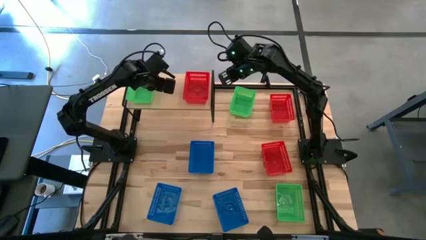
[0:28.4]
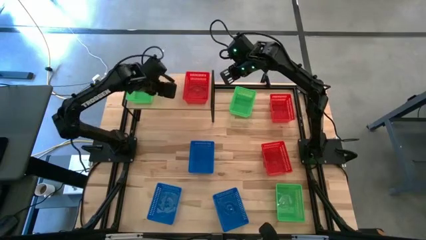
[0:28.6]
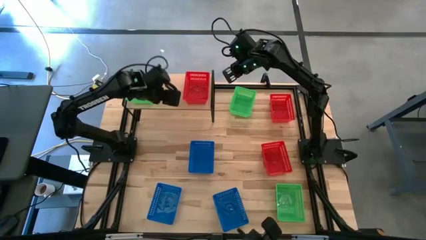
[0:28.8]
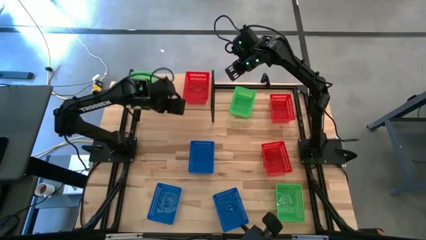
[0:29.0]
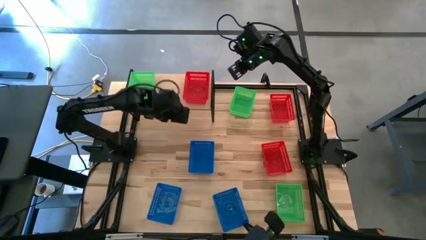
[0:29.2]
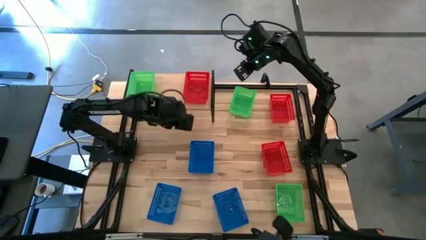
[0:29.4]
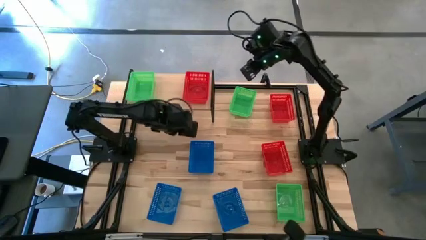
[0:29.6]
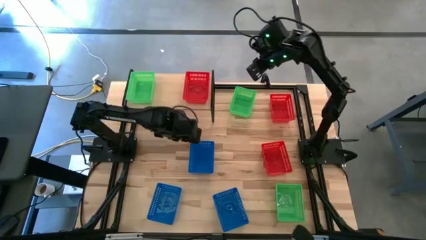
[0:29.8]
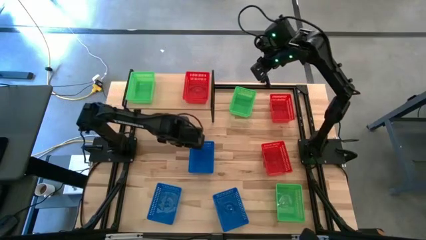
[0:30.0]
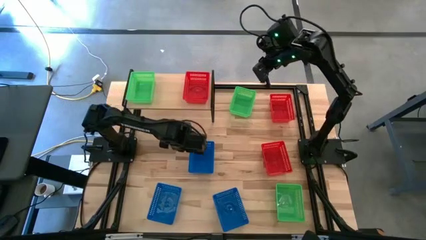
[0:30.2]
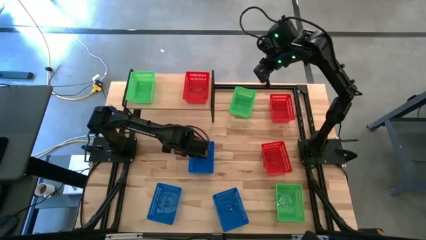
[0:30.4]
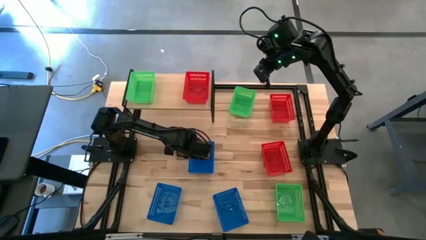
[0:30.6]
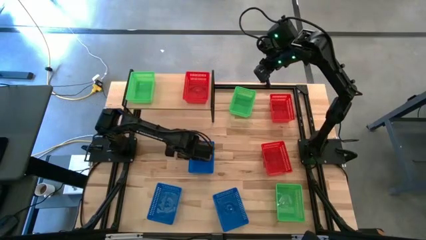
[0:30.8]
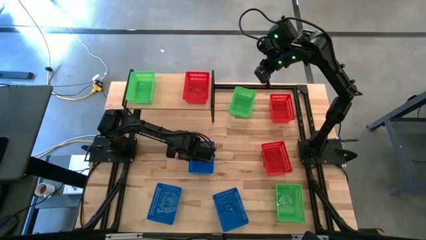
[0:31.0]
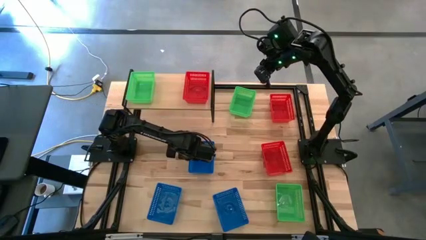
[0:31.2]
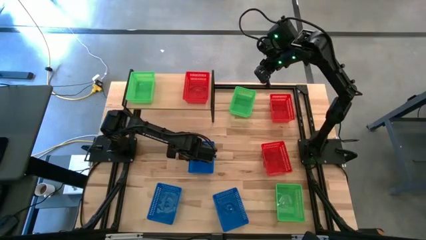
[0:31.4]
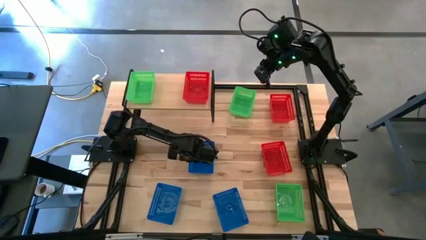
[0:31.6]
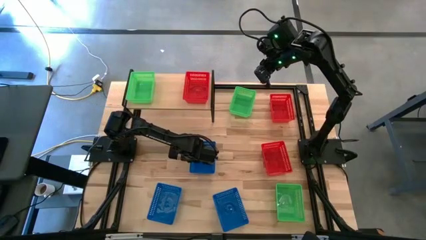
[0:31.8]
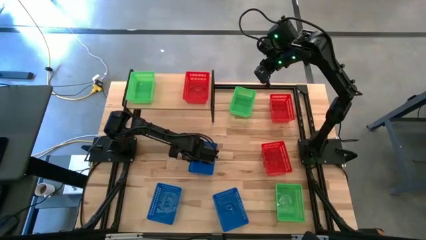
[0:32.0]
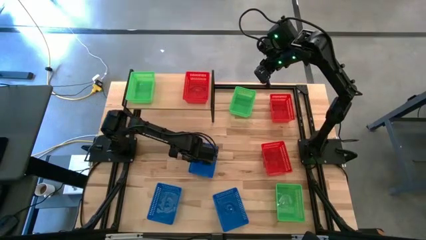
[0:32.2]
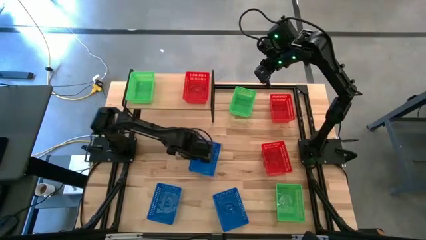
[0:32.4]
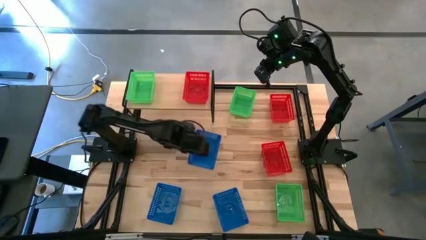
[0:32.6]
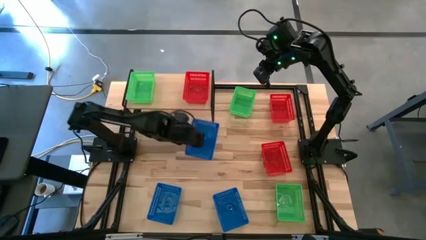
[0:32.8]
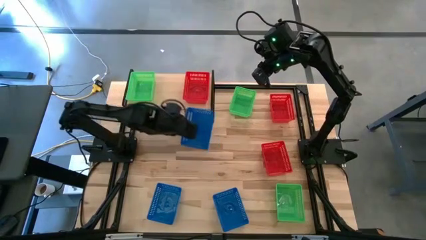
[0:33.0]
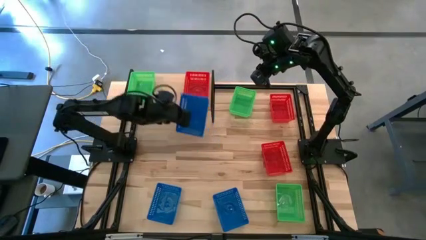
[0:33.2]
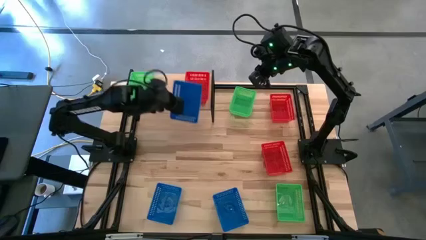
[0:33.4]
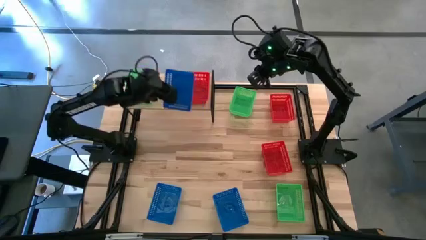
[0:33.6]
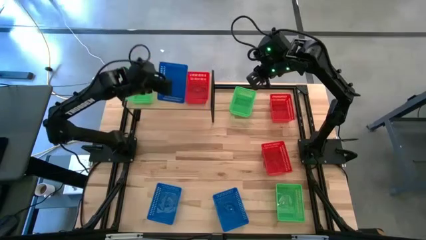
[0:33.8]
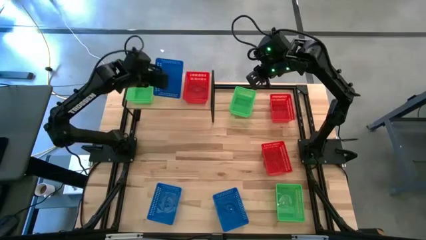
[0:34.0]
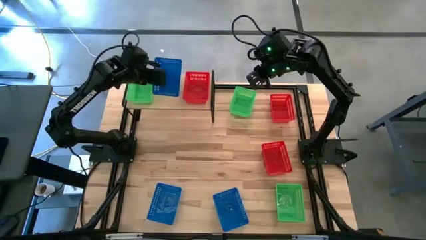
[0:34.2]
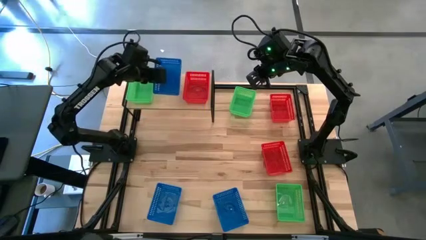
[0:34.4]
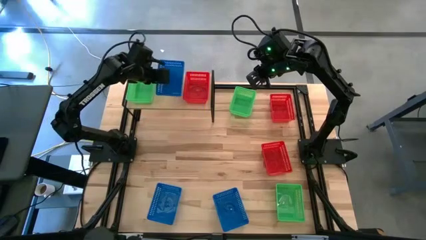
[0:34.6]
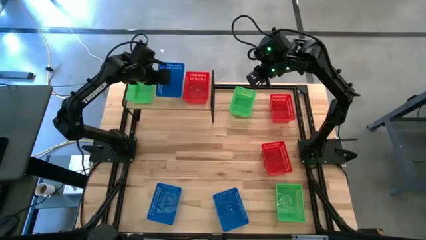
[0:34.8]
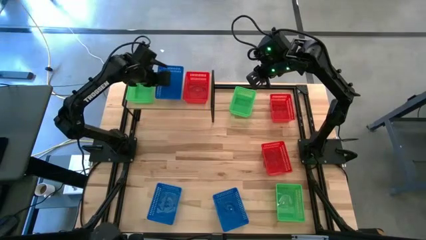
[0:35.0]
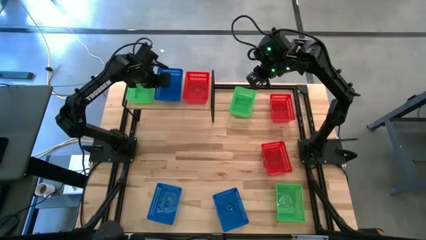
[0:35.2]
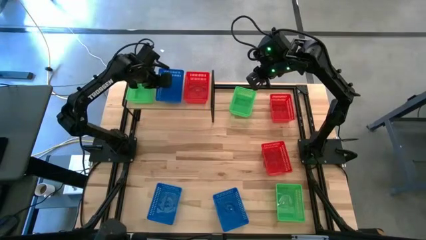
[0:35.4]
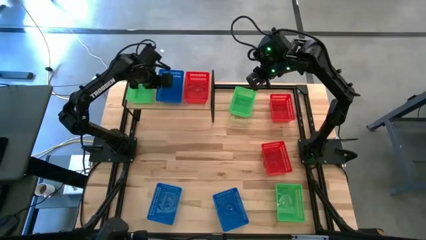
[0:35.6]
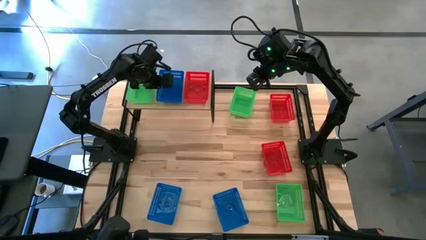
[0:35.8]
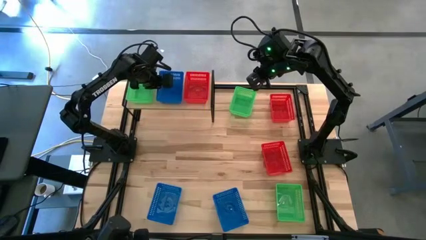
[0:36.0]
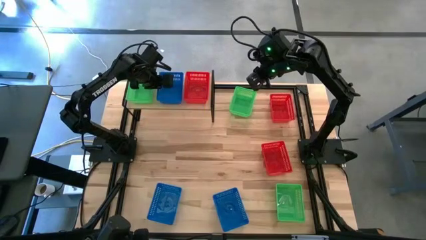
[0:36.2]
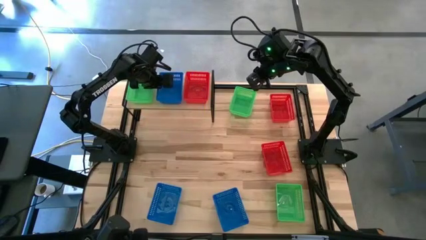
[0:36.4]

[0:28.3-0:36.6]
Task: Stack baskets on shelf by color
Put the top blue bin on the shelf

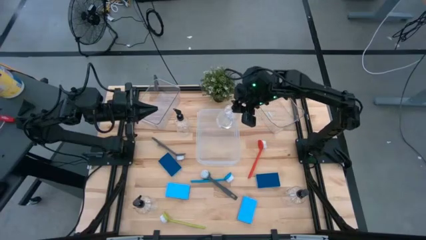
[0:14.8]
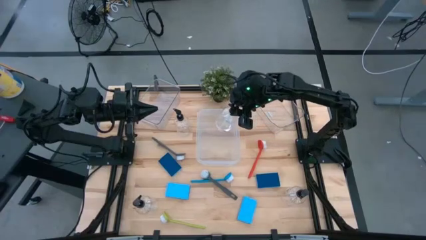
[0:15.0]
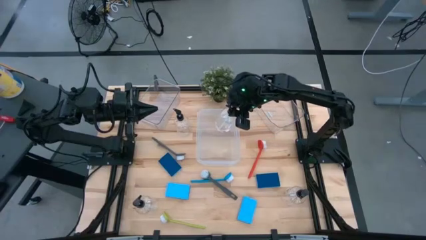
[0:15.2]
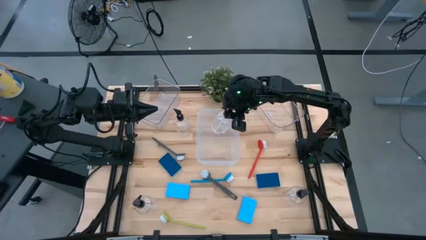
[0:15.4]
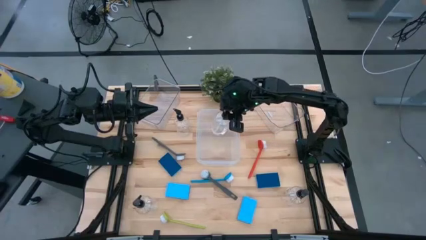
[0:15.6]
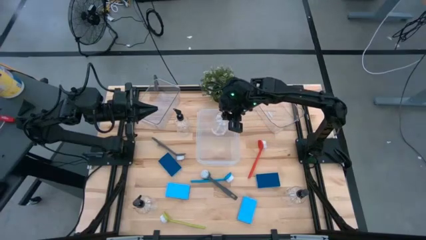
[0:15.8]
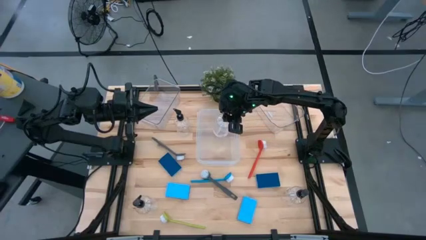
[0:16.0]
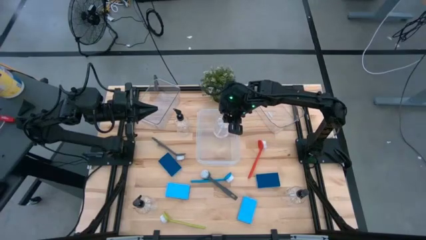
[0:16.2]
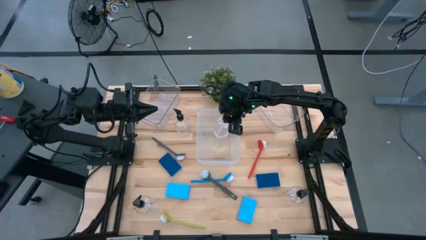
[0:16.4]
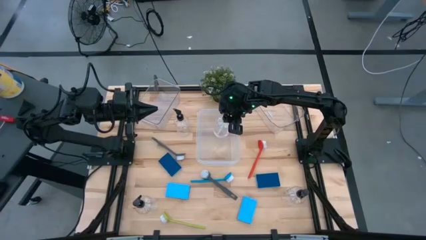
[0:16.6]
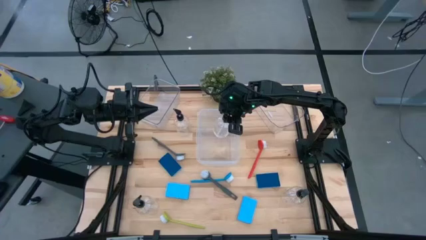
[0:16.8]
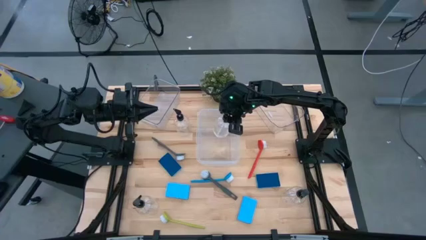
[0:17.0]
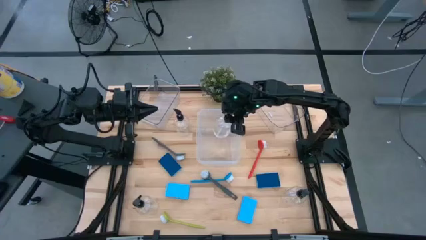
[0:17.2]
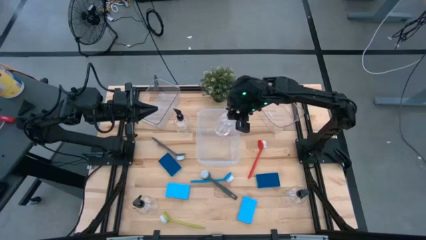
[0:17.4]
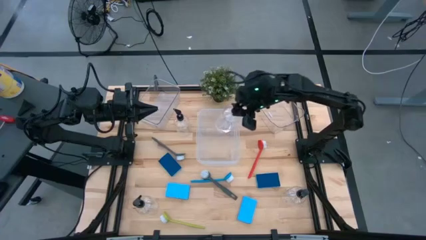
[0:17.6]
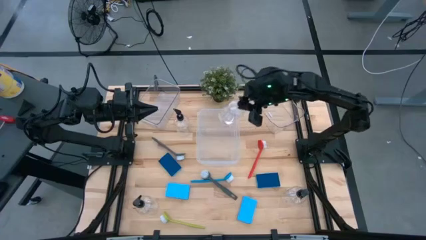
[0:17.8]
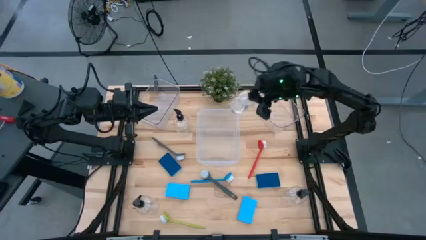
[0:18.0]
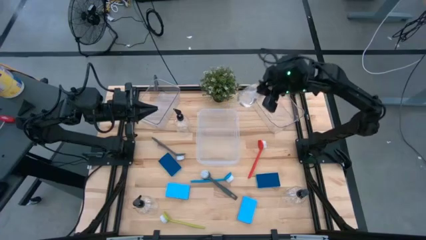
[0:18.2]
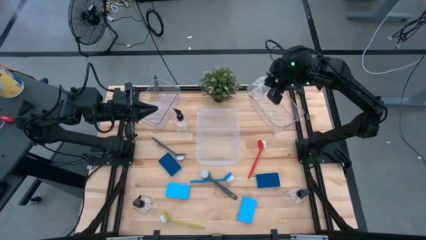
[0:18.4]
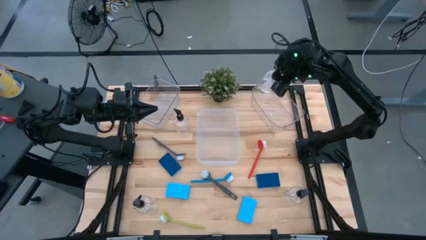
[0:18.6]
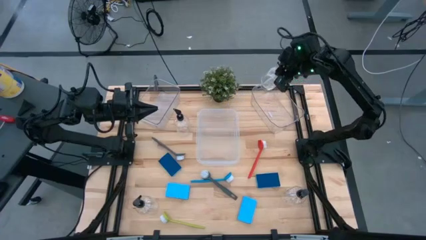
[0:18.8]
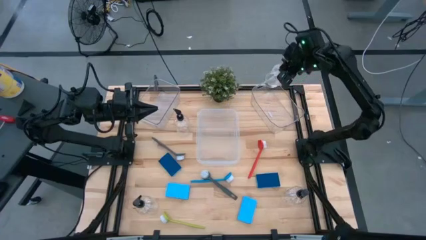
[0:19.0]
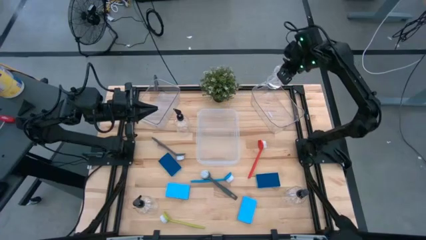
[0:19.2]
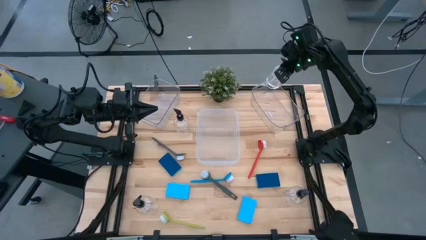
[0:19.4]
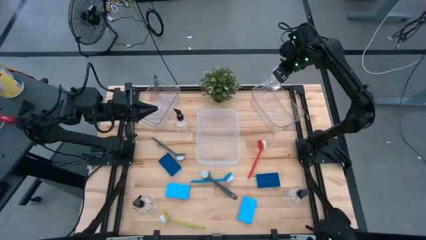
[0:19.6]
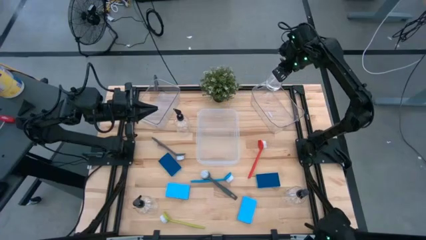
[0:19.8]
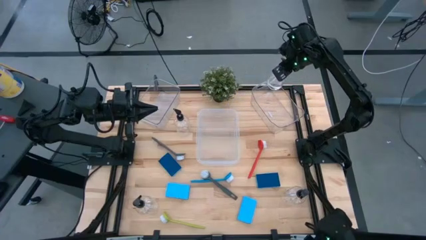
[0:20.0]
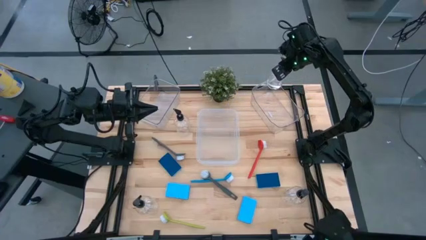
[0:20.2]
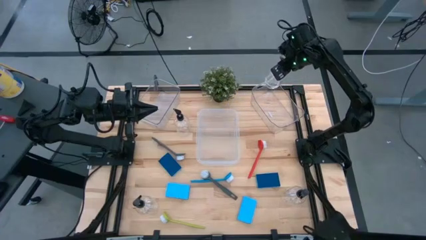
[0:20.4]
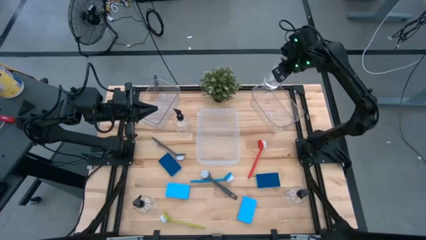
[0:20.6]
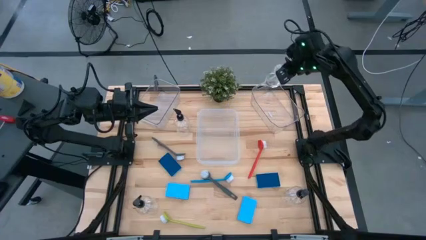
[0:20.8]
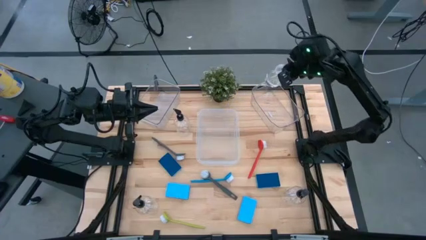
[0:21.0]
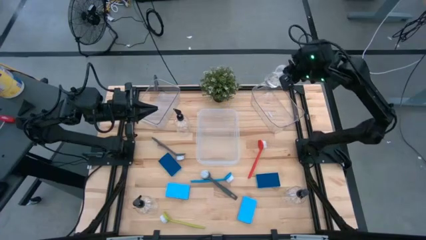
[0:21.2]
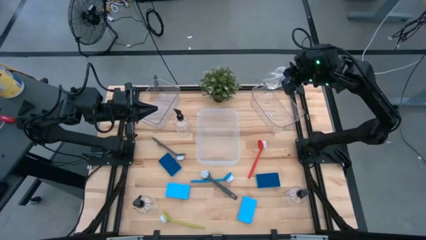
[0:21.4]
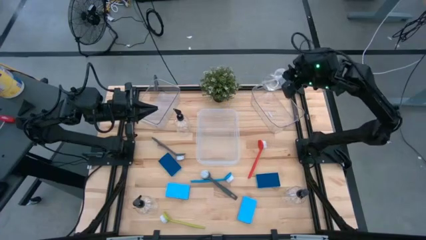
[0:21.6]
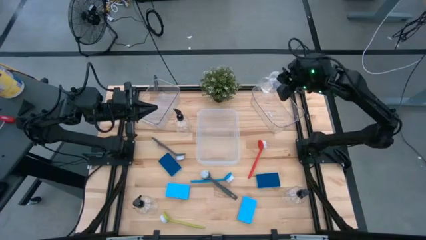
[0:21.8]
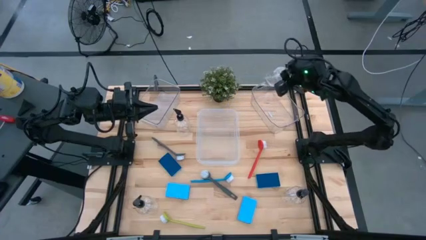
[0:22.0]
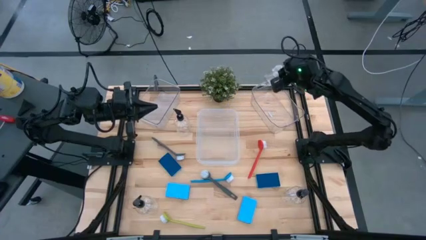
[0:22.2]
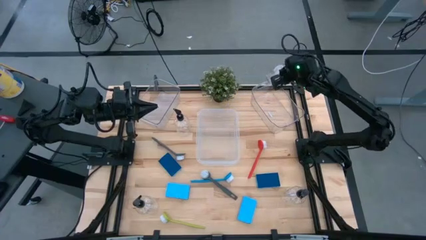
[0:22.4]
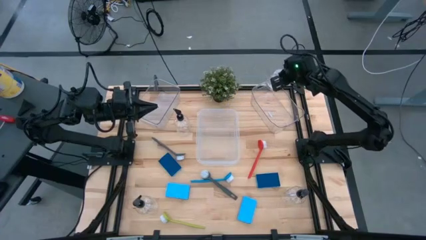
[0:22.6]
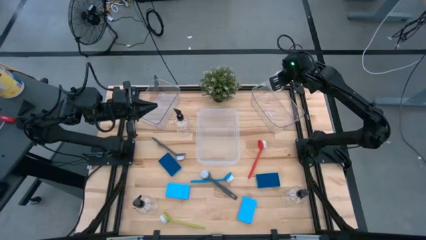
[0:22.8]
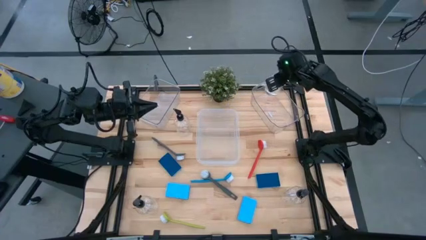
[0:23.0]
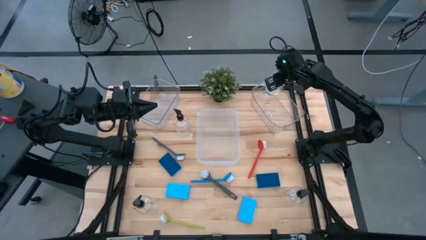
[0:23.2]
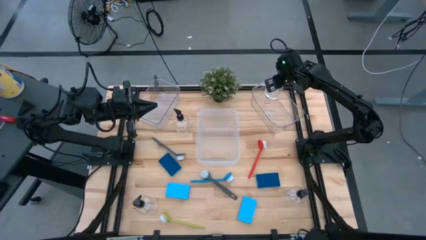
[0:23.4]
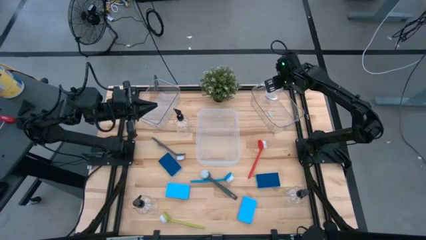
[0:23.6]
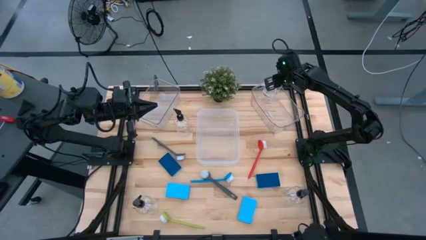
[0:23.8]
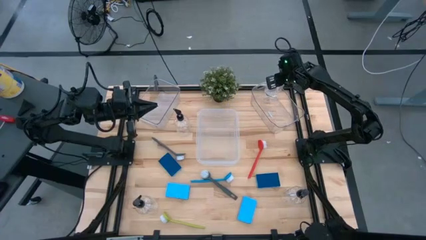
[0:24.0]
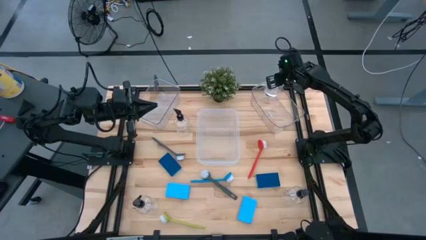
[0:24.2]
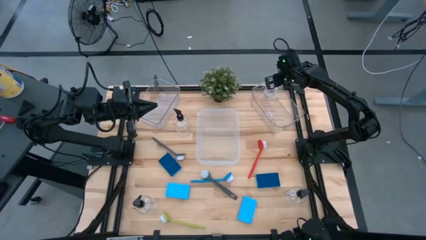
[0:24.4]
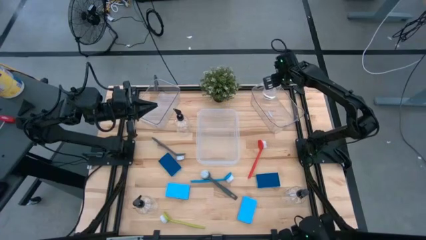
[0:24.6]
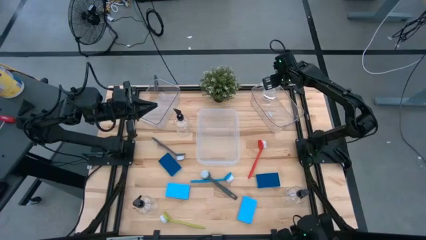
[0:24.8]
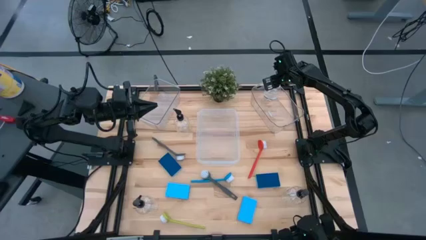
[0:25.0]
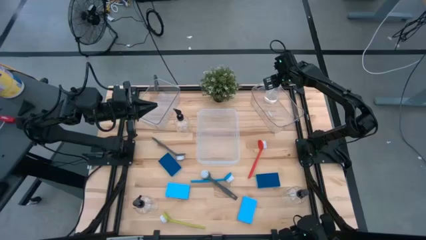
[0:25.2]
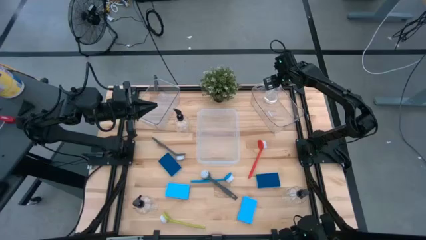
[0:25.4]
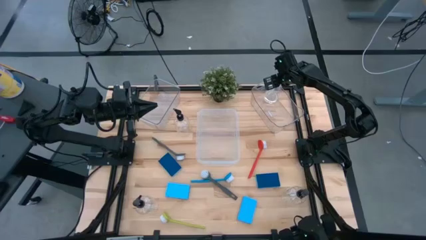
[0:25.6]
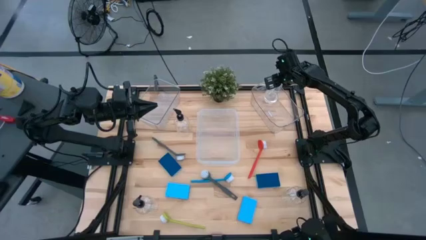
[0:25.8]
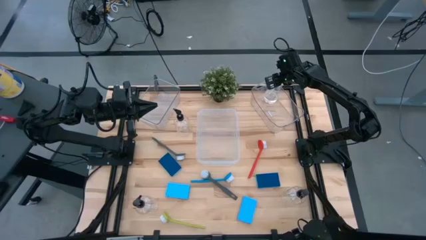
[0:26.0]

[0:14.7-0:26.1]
Task: Pick & Place Kitchen Sink Supplies
Put the black soap dispenser into the right transparent bin
